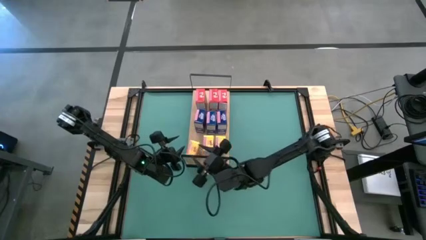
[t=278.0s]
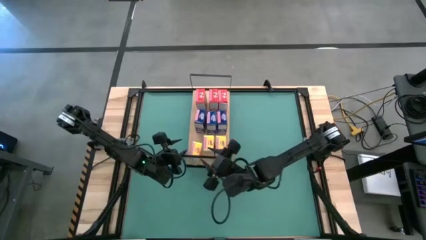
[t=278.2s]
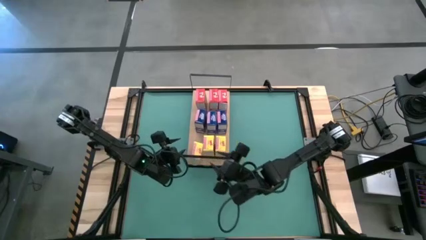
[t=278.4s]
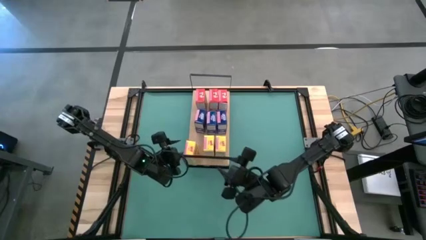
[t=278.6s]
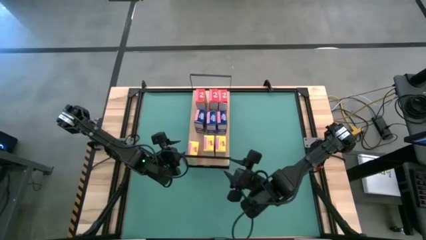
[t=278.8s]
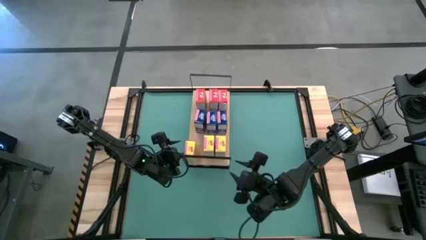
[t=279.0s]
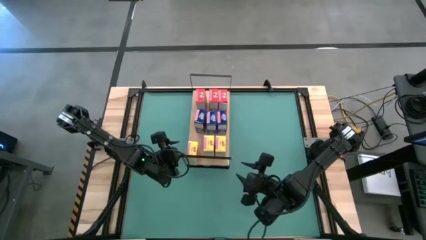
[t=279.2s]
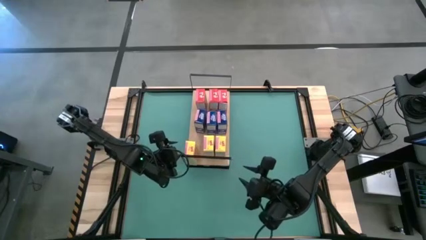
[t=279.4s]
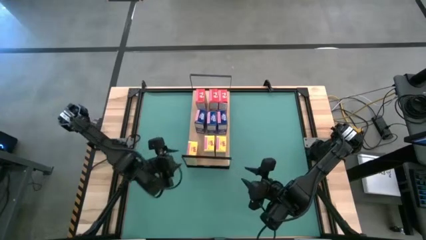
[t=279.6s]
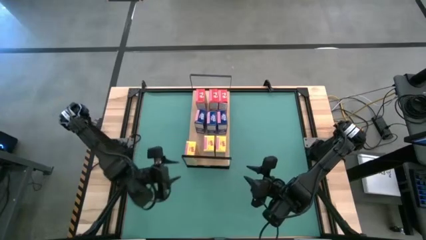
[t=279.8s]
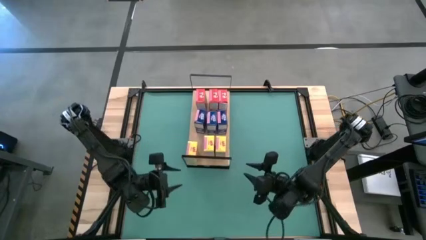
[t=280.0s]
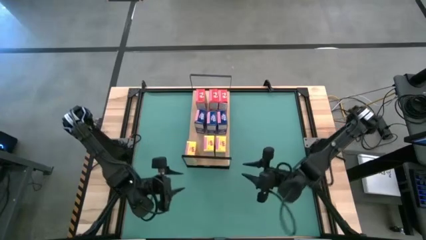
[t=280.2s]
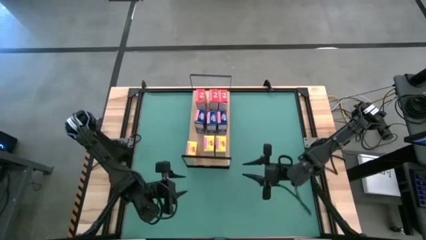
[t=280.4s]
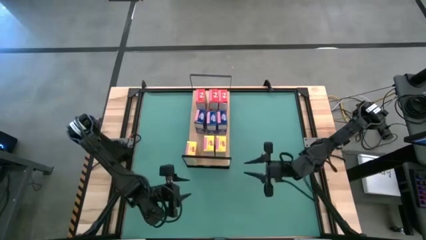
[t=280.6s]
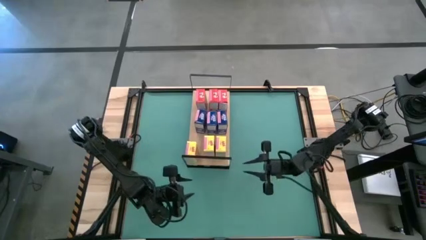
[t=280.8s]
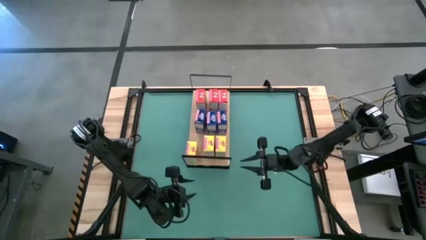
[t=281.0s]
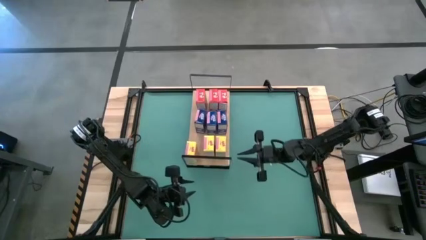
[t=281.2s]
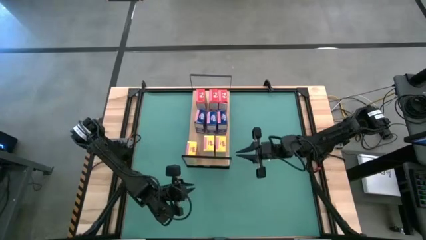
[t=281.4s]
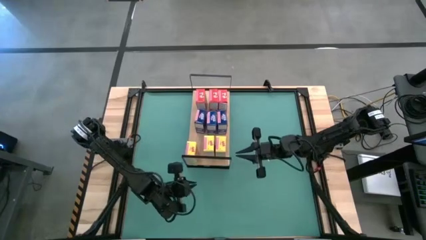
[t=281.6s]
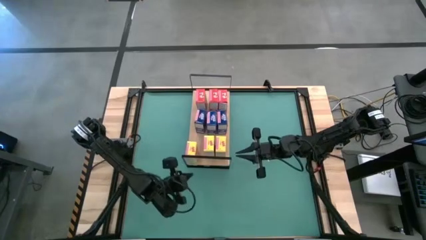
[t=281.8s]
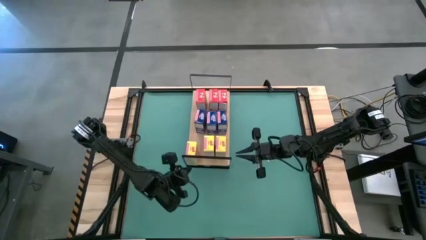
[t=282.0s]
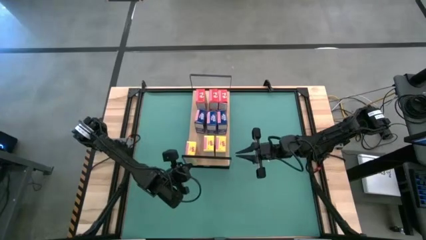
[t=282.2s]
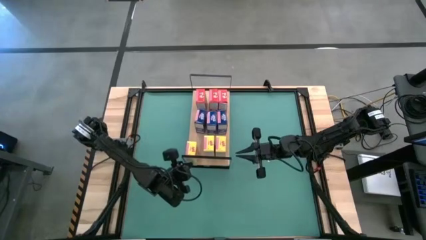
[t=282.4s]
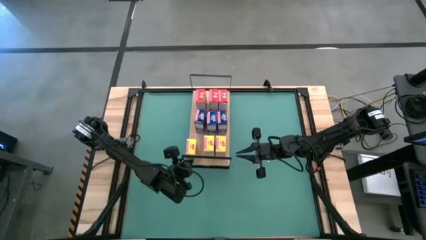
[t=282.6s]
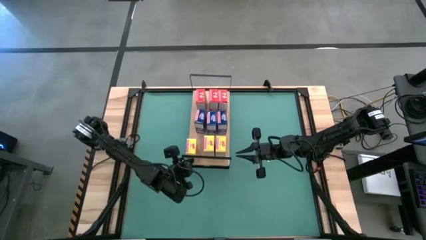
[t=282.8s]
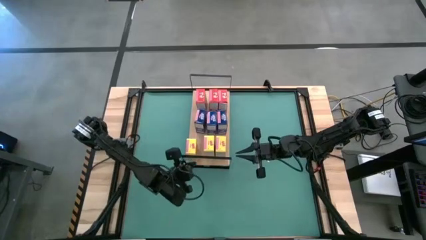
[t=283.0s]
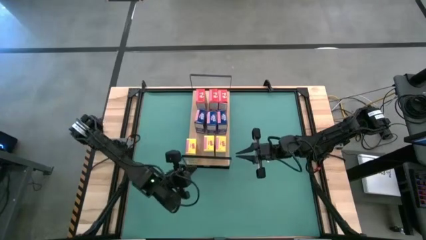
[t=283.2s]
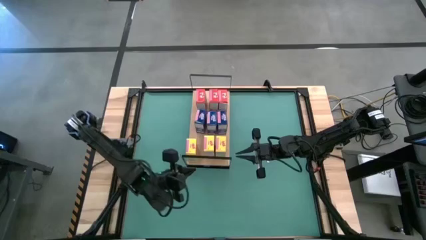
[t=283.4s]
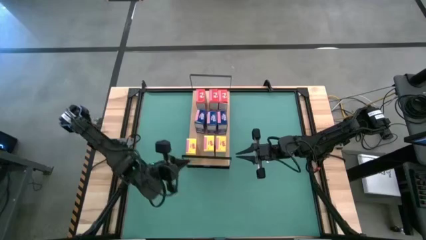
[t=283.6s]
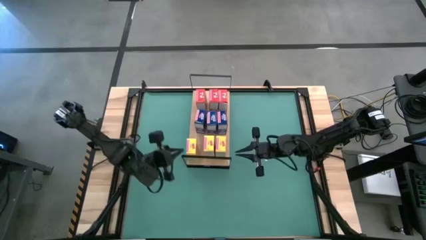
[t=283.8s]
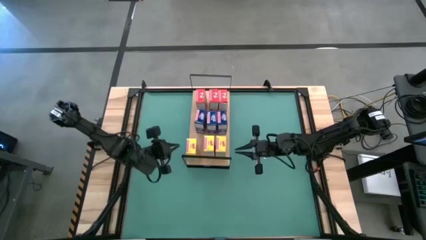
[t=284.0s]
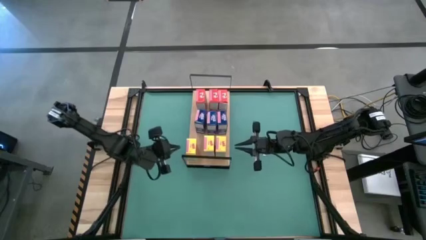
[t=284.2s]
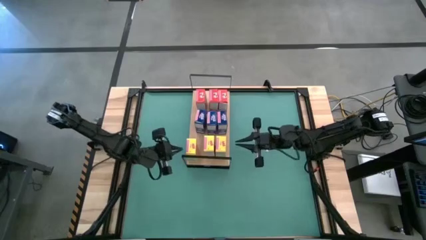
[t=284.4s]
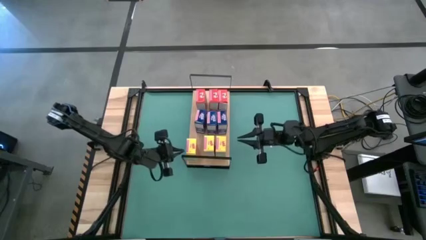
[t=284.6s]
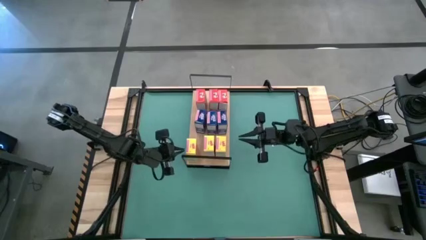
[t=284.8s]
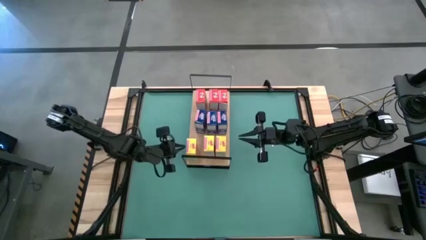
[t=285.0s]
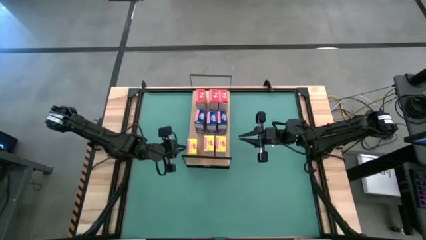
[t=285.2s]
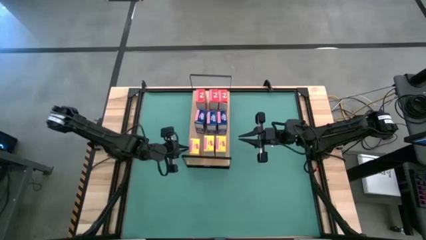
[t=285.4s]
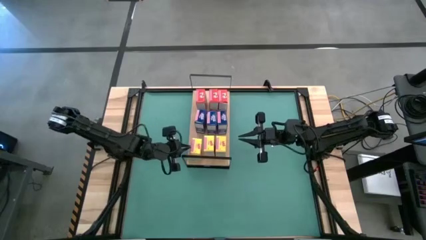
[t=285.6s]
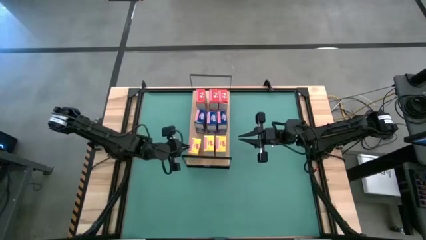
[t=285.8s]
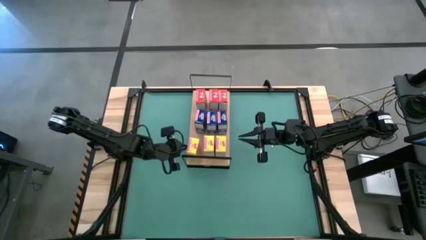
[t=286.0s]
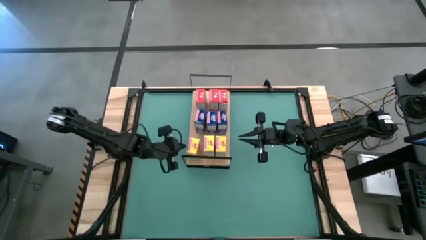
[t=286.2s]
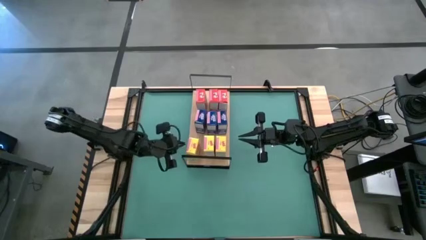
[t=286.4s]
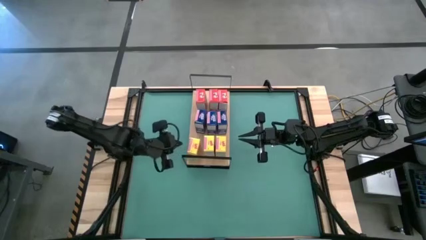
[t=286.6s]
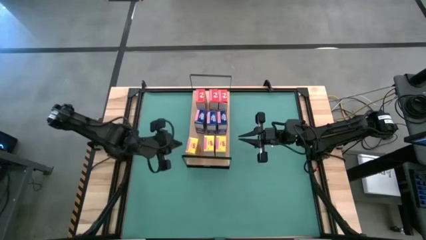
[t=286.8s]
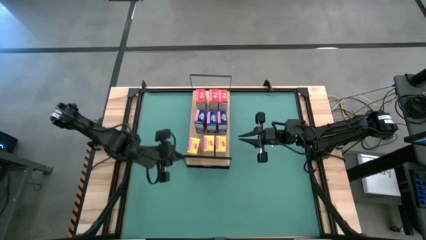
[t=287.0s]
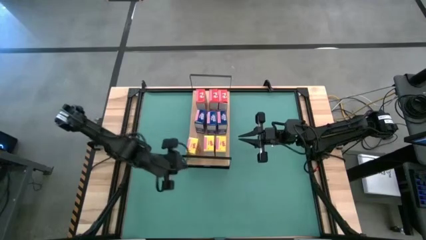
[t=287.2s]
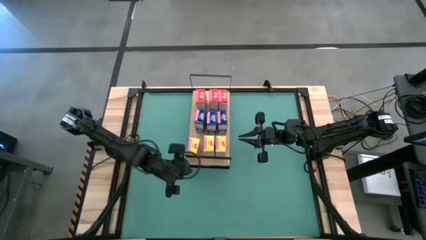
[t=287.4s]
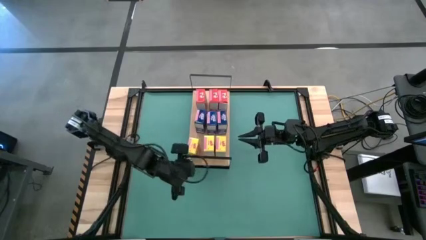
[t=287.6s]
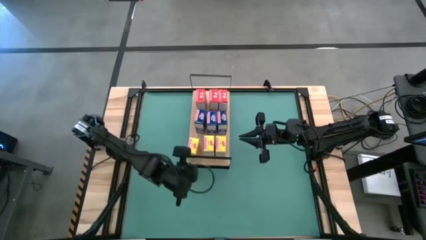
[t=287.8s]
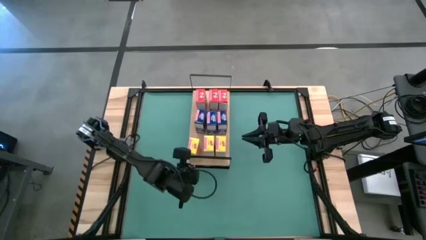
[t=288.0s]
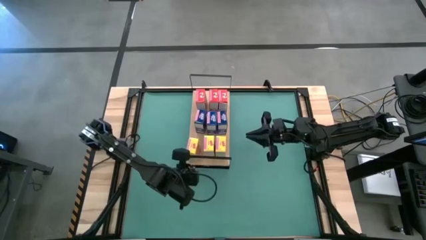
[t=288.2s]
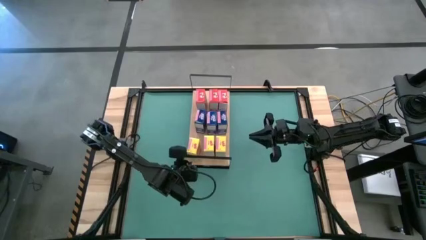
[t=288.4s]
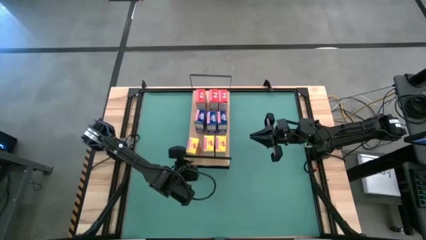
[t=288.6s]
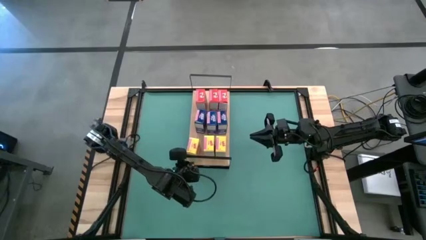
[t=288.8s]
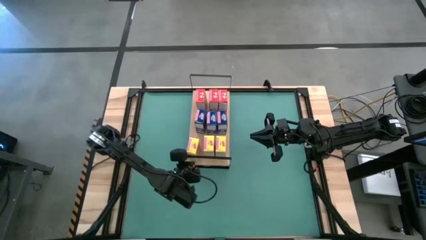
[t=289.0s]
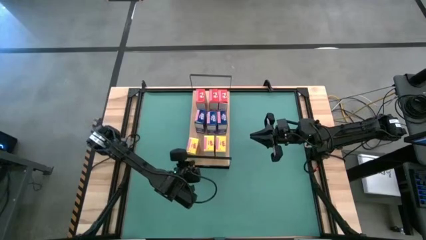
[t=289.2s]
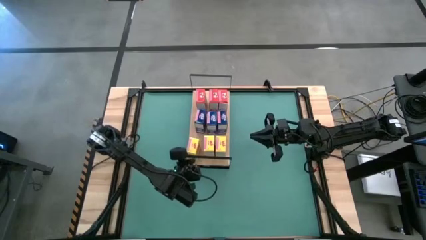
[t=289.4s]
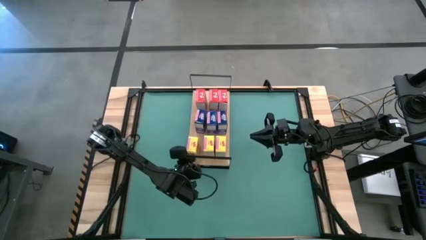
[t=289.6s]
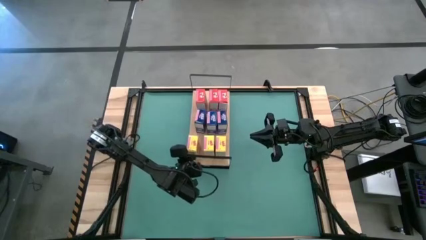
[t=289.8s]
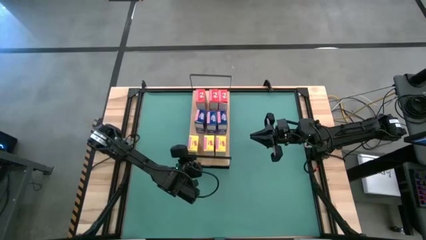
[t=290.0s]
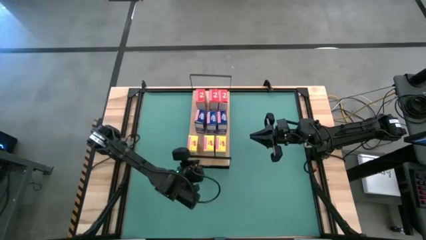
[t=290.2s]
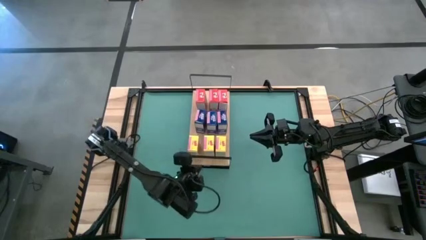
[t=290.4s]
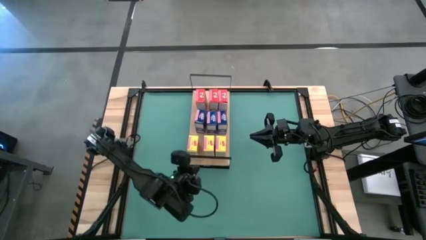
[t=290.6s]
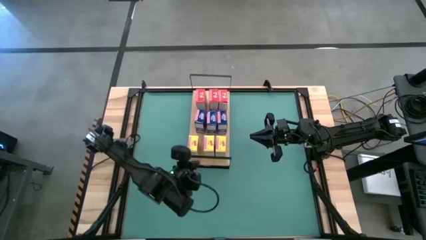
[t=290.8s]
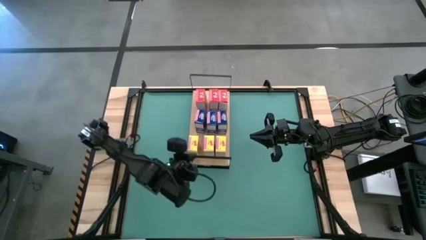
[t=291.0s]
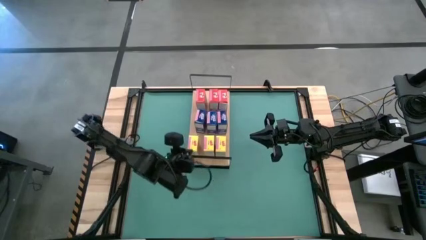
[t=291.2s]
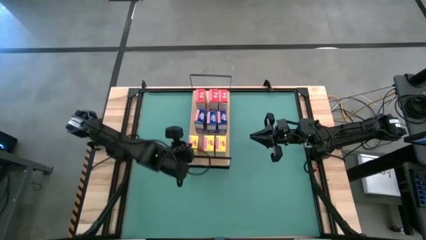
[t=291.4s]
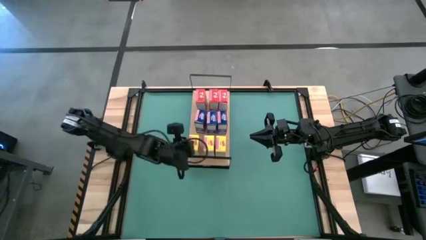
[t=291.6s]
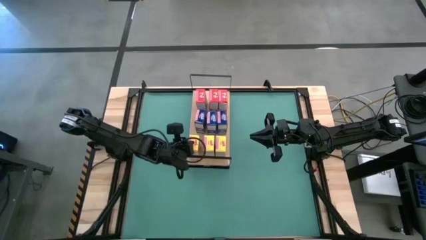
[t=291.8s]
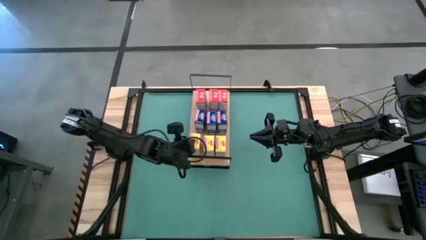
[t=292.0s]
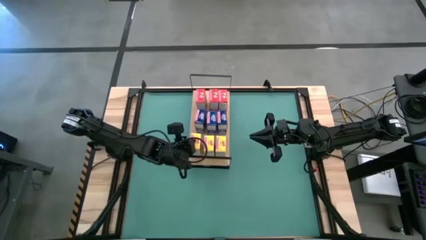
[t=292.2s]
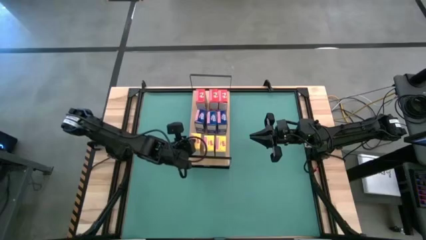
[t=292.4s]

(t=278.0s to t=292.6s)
Task: Stack cereal on shelf
Put the yellow cereal box on the shelf and align it with the other yellow cereal box

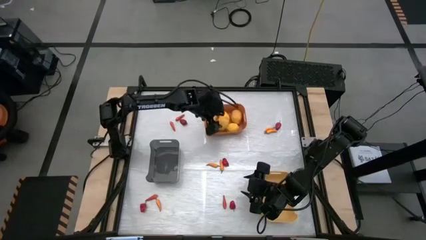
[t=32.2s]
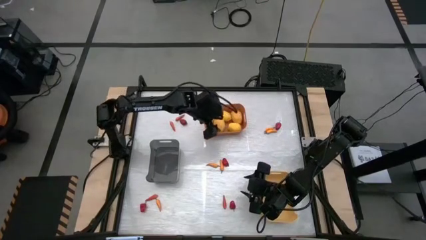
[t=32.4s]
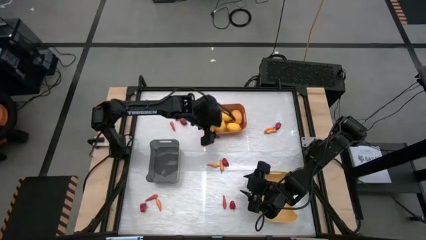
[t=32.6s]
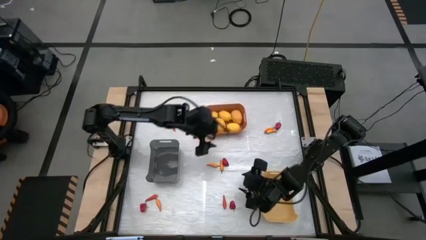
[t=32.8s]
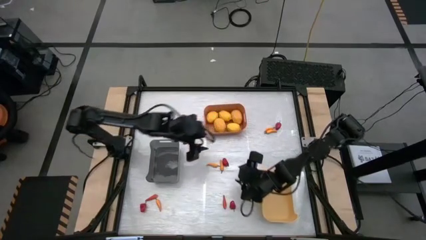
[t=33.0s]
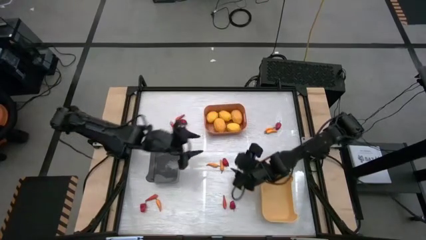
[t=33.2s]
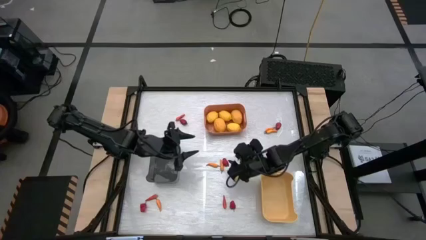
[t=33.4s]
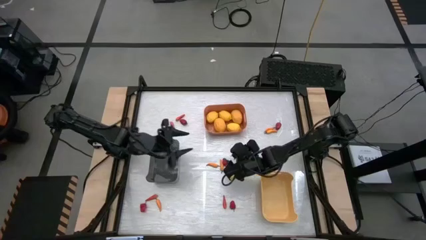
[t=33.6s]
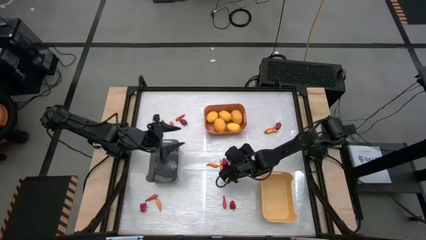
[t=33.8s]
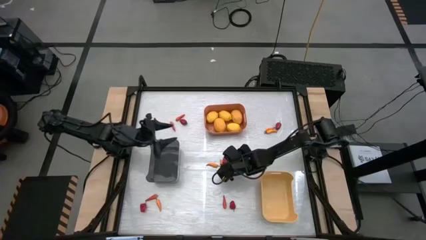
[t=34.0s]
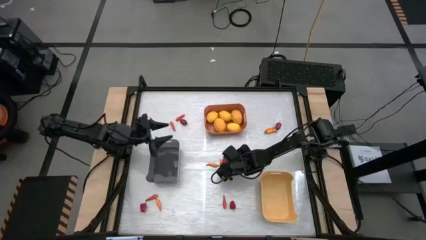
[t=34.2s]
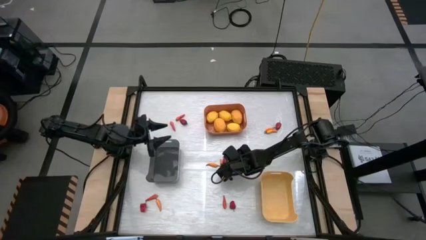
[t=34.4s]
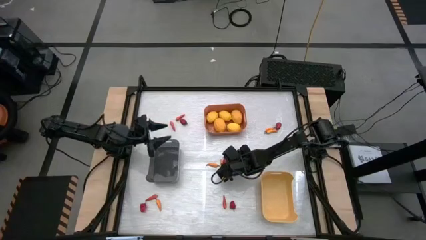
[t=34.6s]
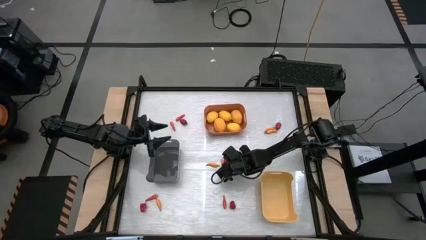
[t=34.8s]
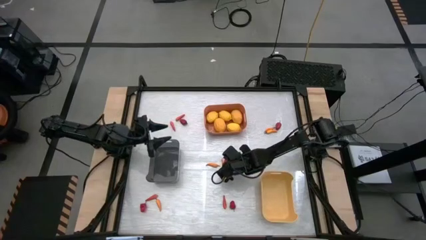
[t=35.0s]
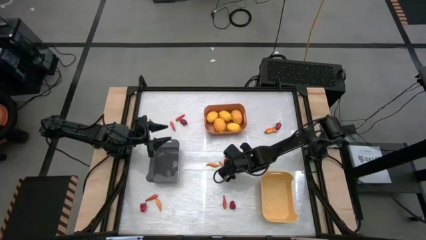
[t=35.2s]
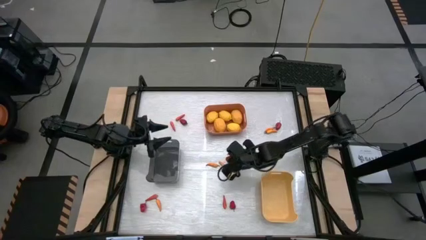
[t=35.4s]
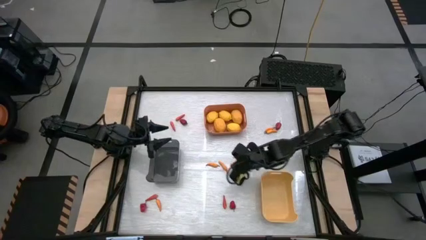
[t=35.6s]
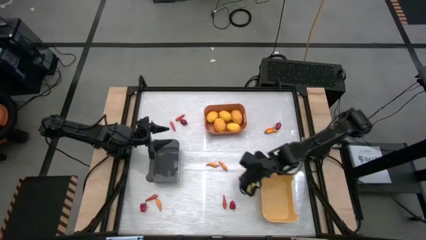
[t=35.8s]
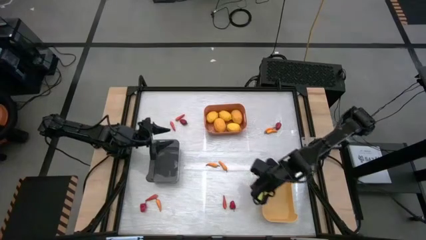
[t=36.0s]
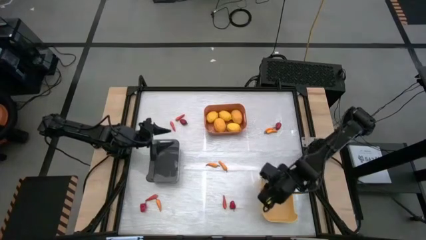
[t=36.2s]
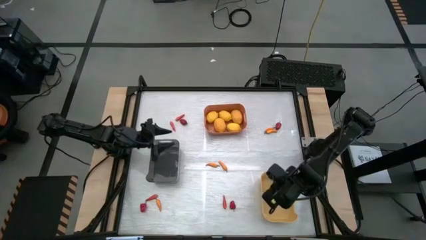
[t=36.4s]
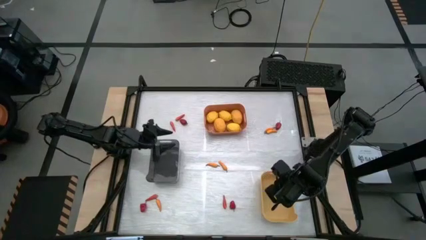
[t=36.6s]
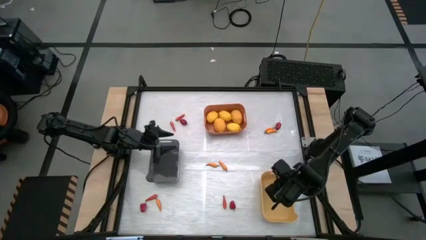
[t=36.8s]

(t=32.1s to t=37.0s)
Task: Sort produce into baskets
Put the red chili pepper into the yellow bin
